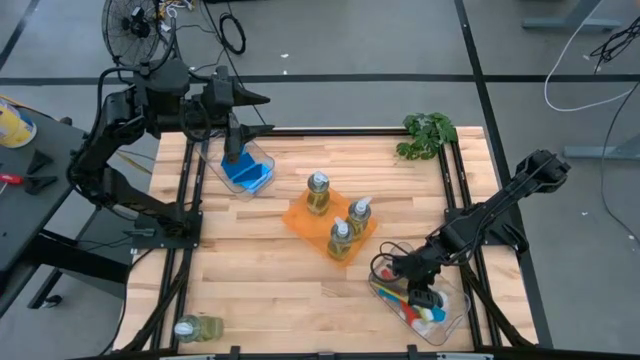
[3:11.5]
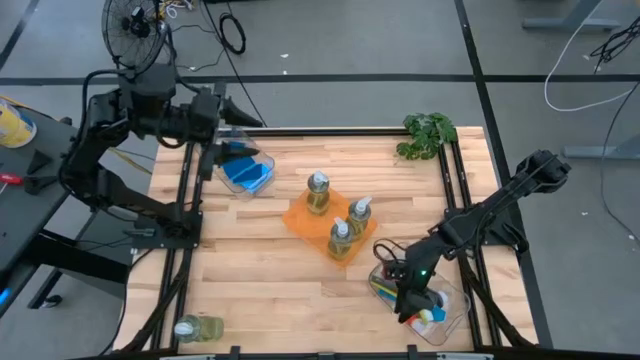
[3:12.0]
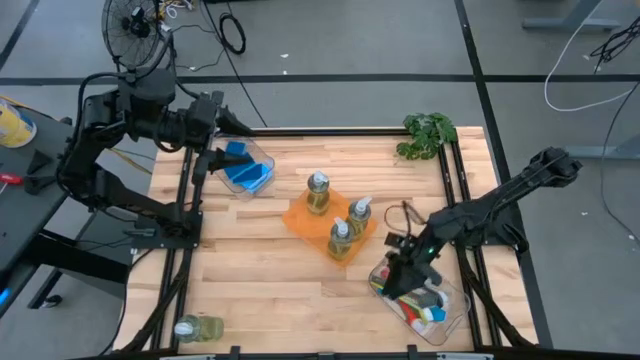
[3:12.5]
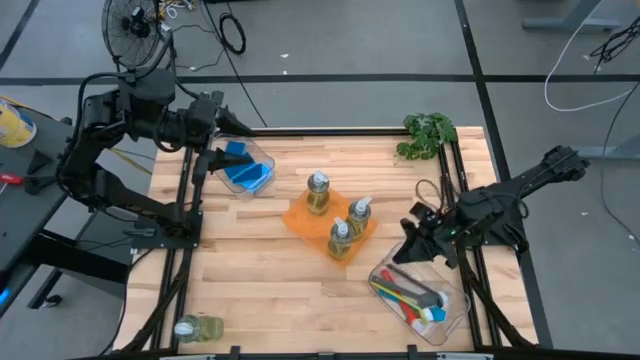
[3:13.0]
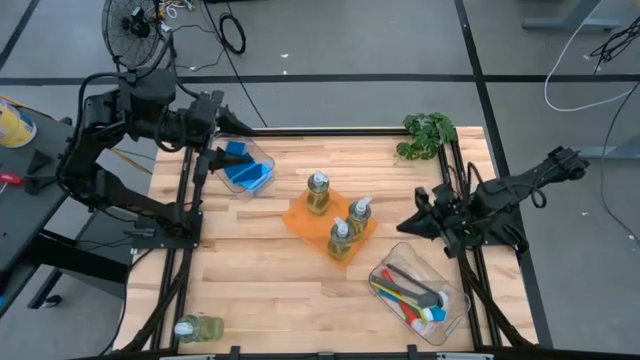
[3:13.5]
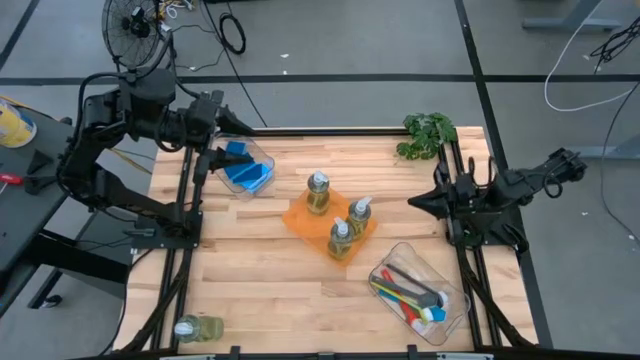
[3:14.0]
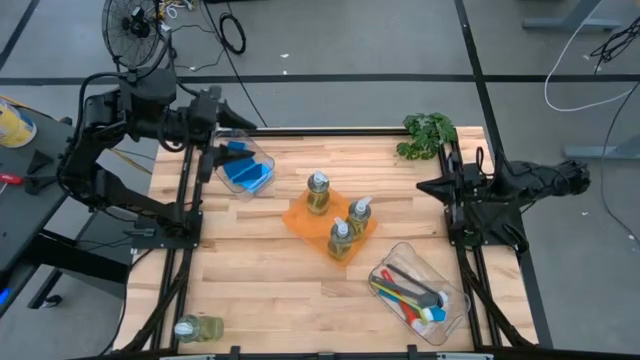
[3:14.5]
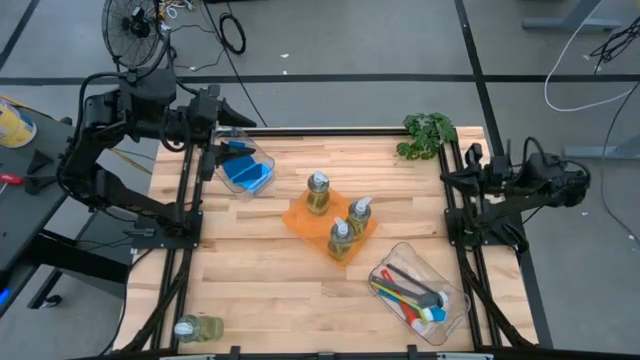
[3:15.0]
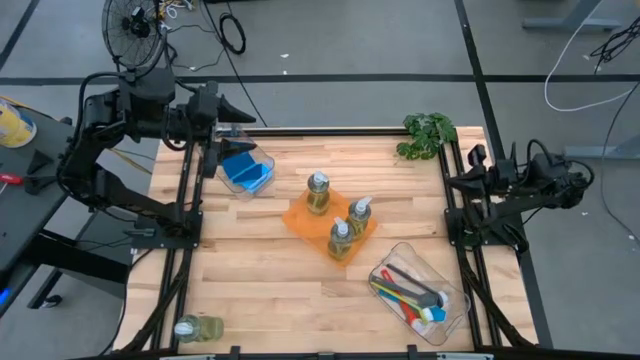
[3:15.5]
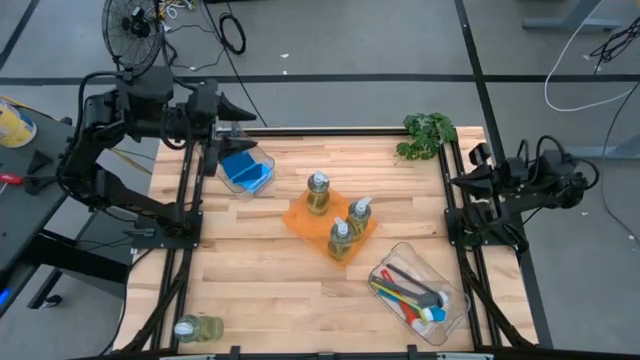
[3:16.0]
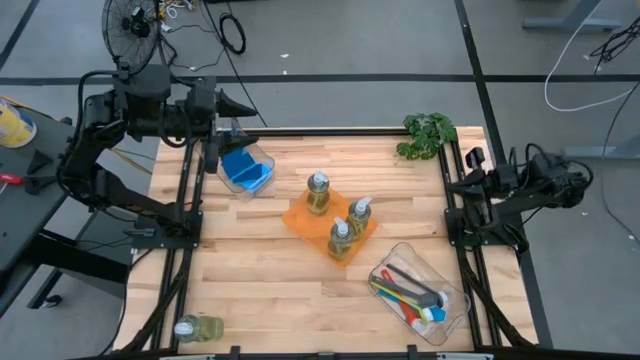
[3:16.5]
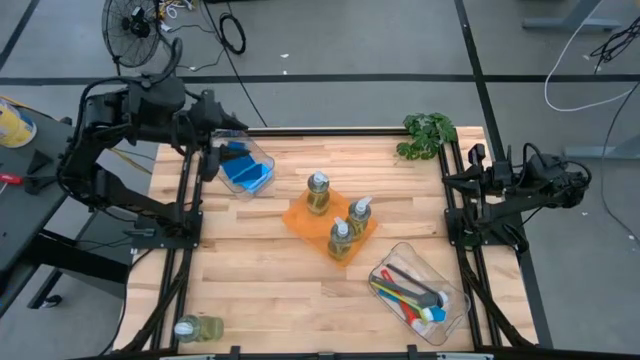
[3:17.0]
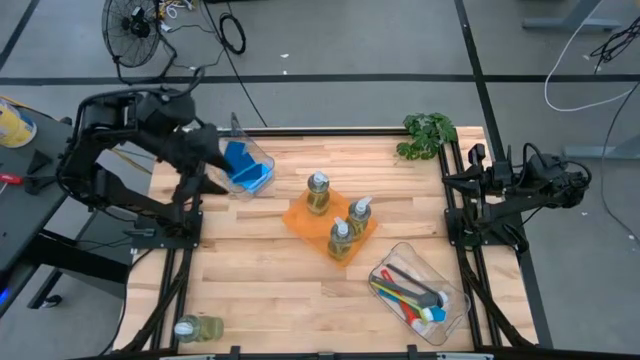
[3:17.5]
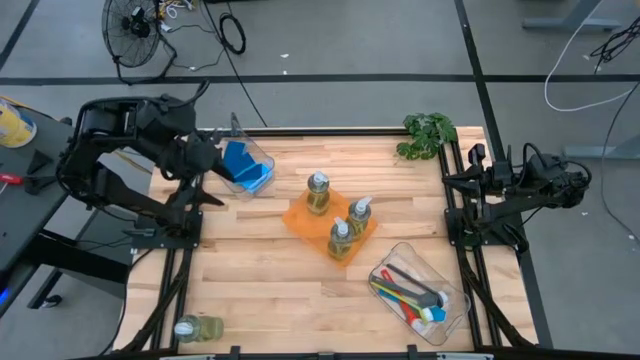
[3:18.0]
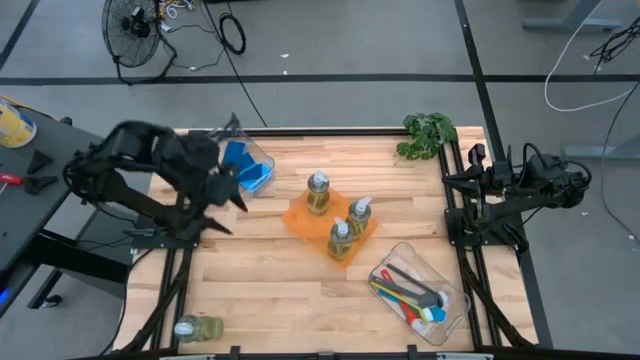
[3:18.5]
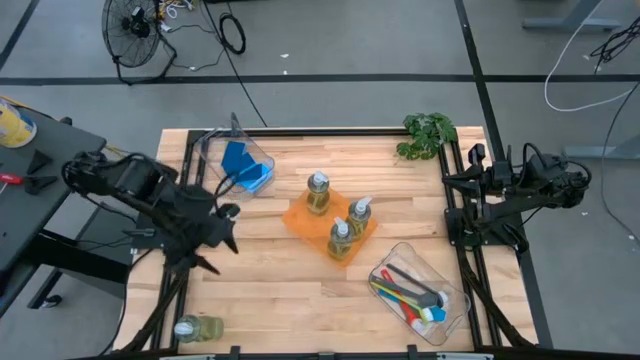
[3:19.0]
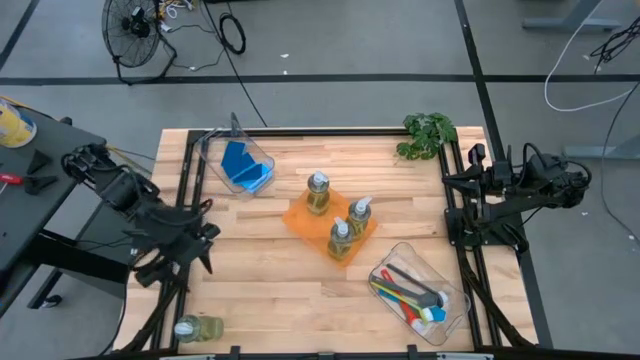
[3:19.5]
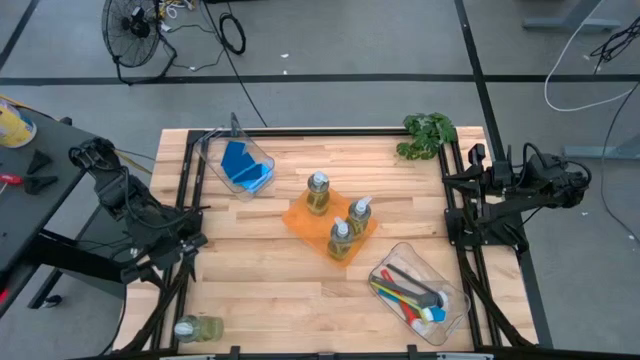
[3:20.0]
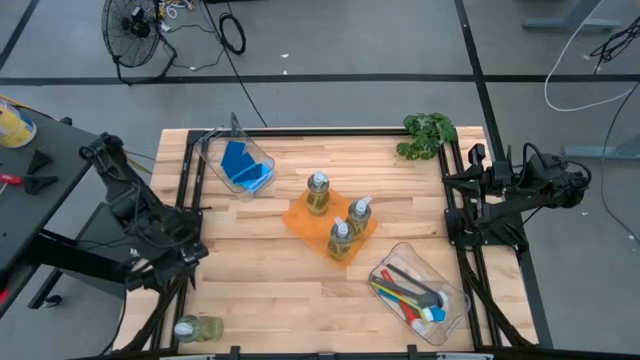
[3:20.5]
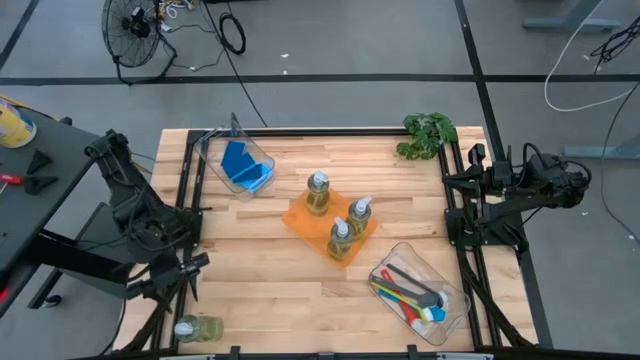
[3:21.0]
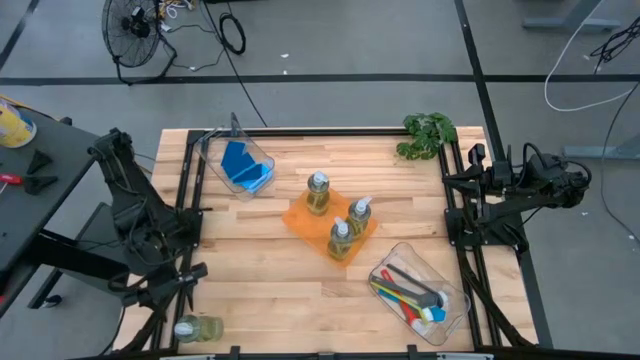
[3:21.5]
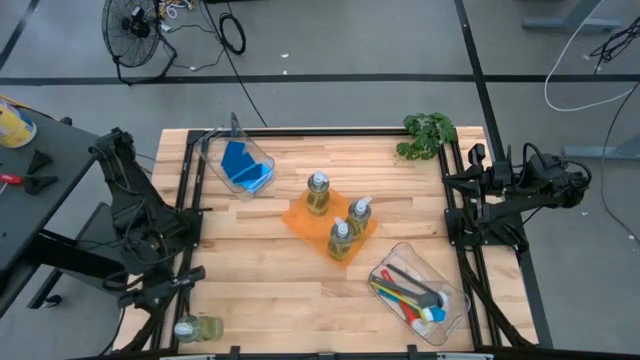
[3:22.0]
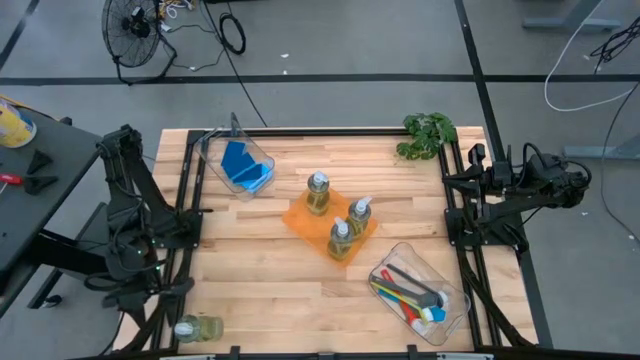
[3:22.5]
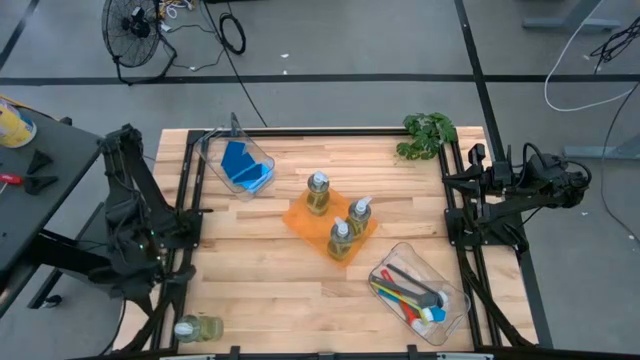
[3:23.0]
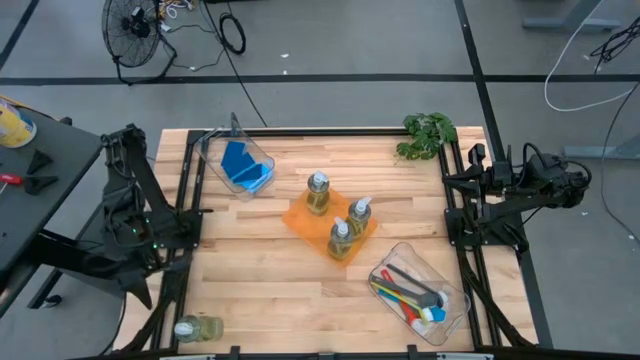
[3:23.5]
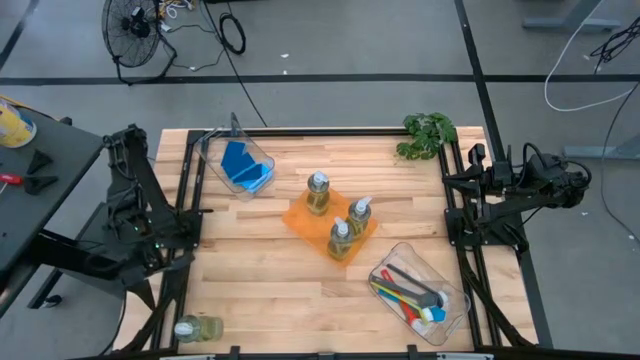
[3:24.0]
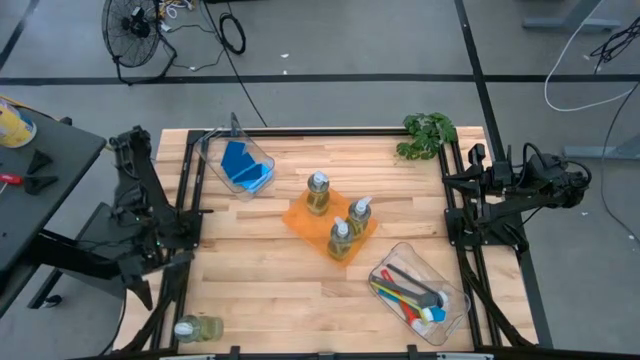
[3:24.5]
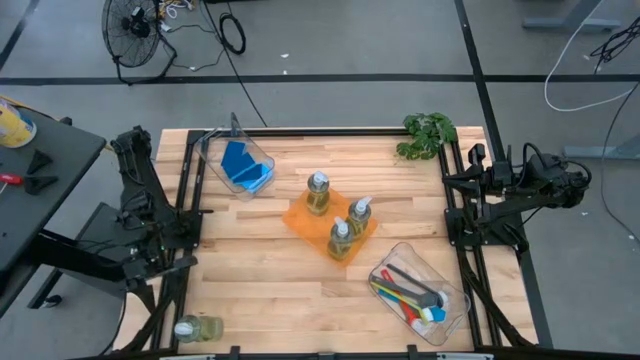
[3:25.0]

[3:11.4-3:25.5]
Task: Pick & Place Kitchen Sink Supplies
Put the yellow dish soap into the orange bin

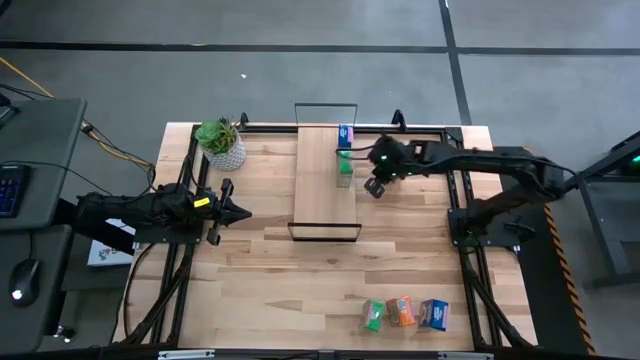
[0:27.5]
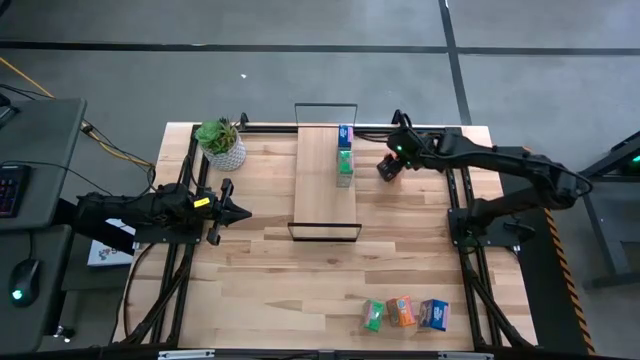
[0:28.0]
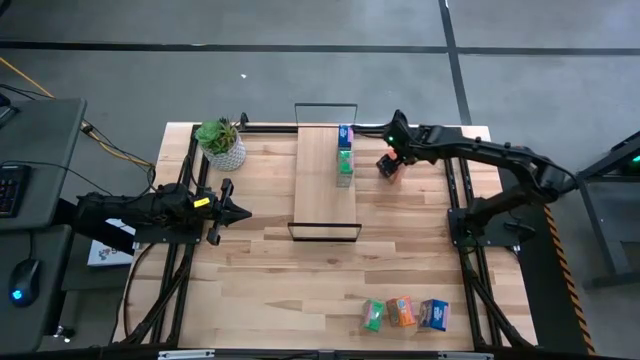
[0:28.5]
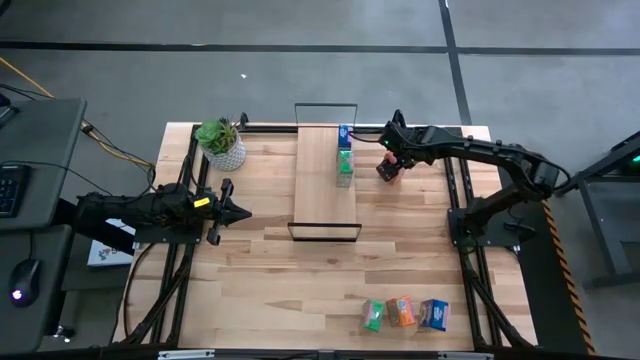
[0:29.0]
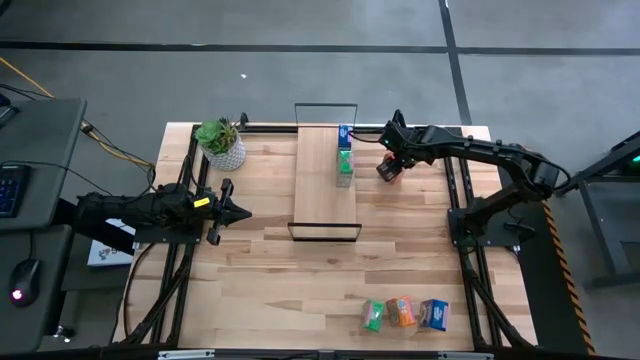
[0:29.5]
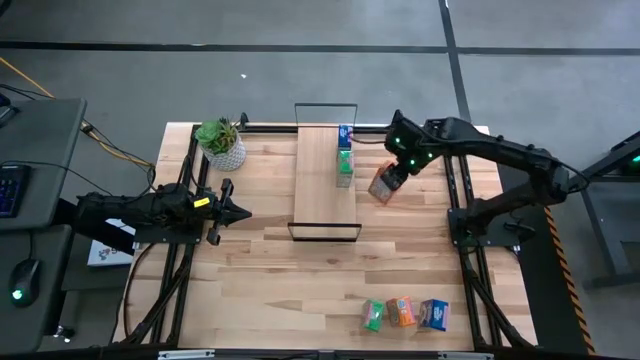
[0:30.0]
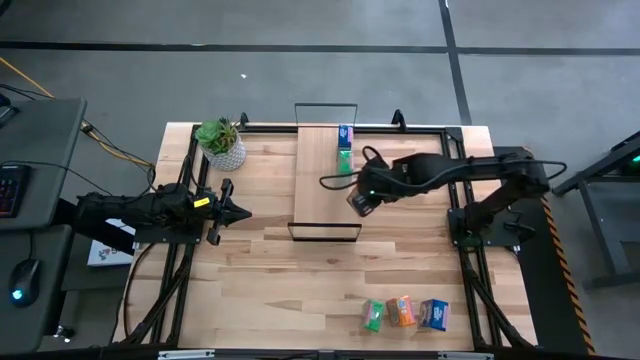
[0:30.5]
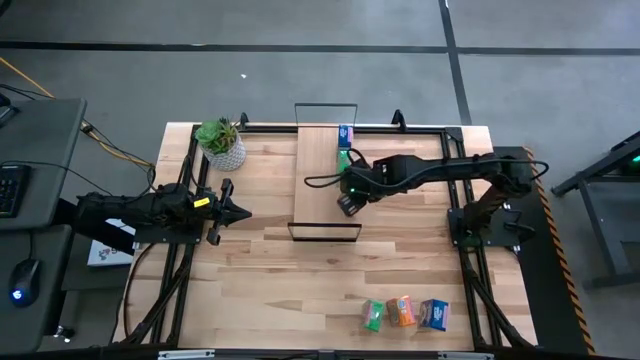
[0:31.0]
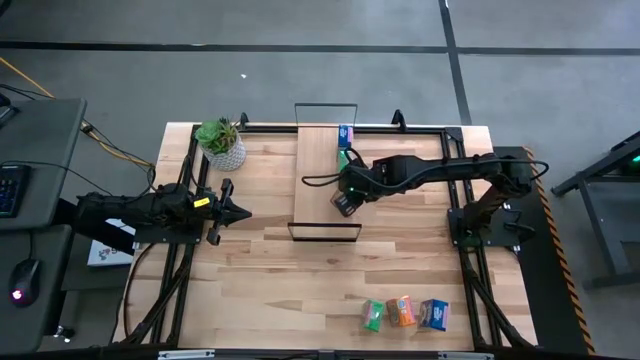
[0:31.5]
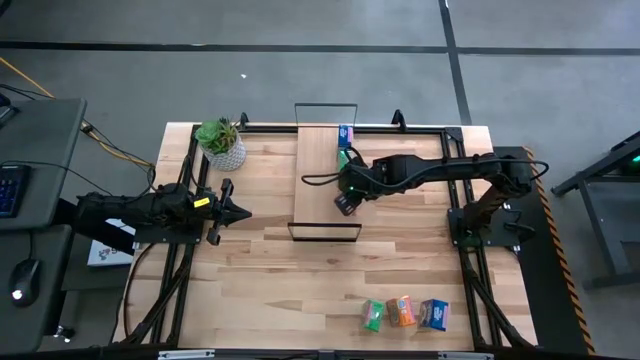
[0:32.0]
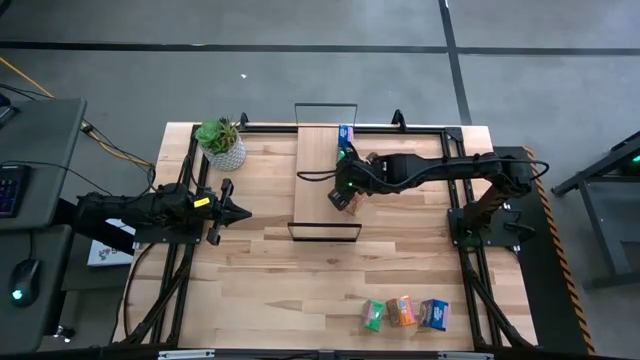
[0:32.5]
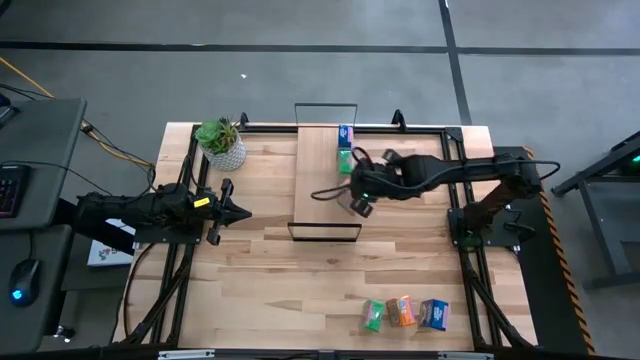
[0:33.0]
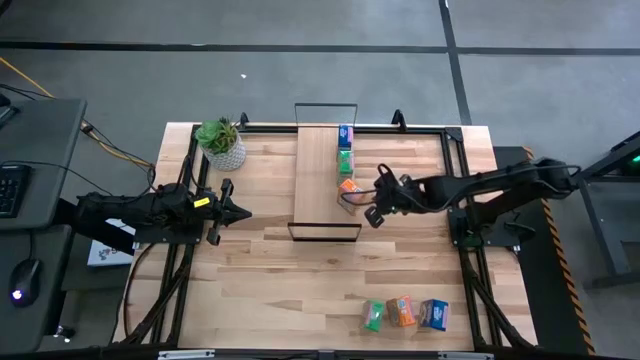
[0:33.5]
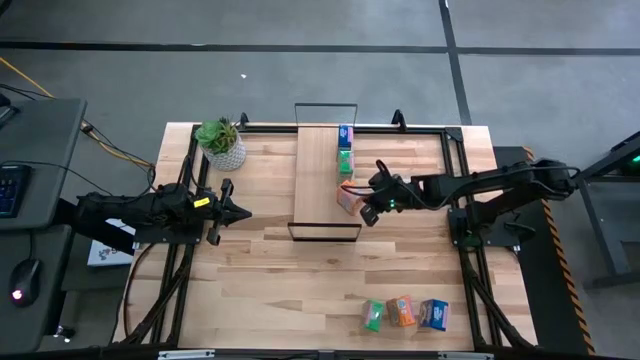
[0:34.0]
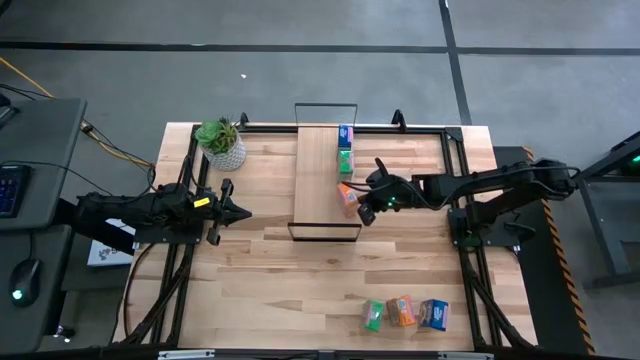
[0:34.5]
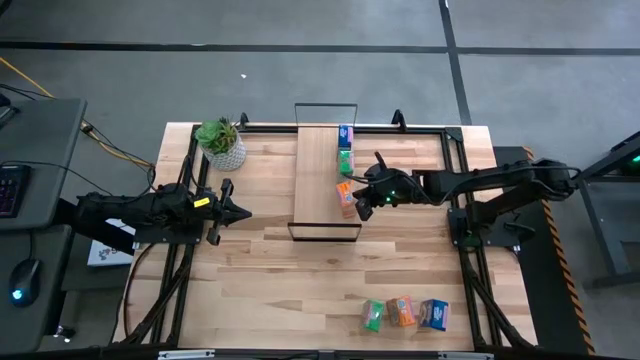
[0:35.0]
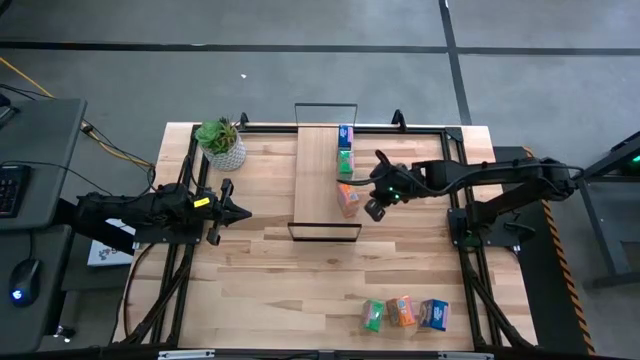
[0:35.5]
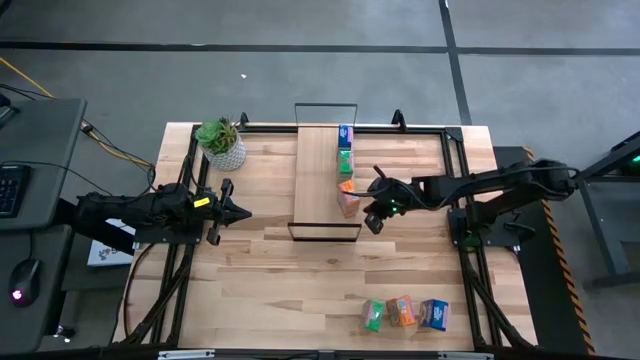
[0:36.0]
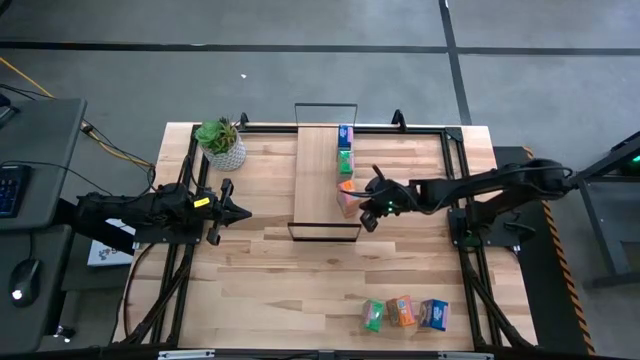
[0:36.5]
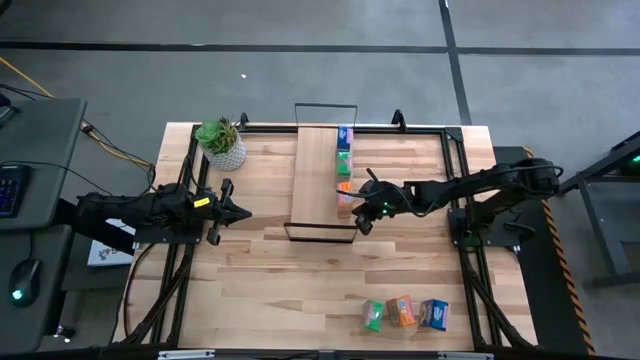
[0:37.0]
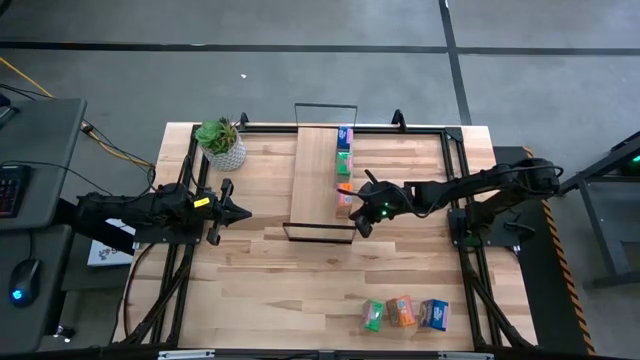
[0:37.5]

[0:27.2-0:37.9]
Task: Stack cereal on shelf
Put the top orange cereal box on the shelf
